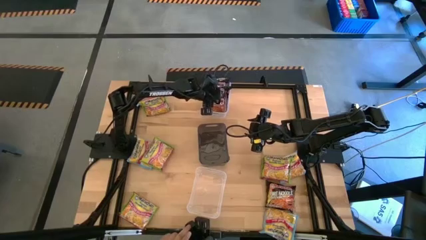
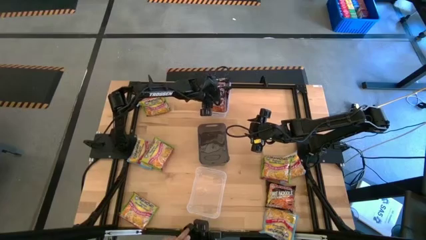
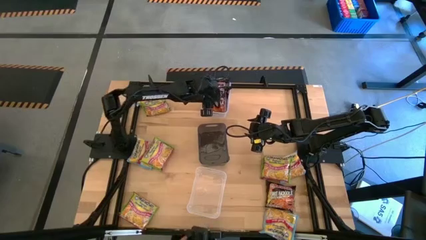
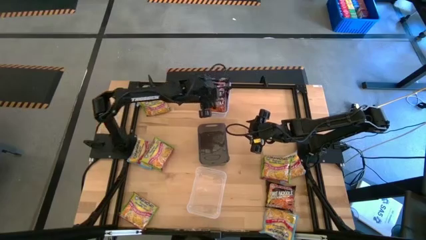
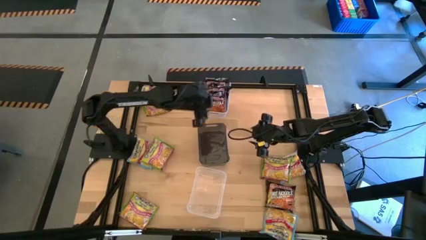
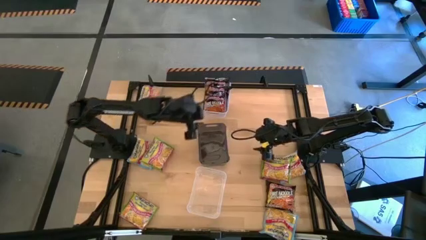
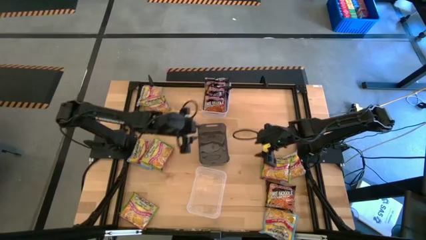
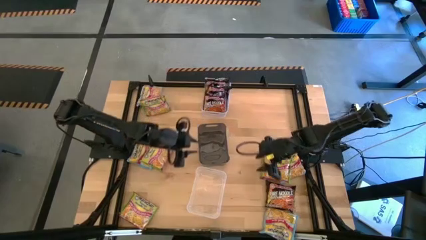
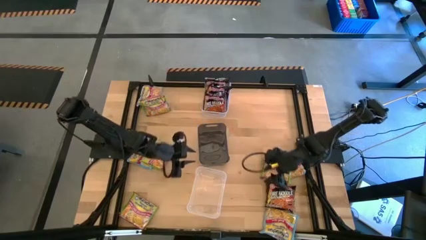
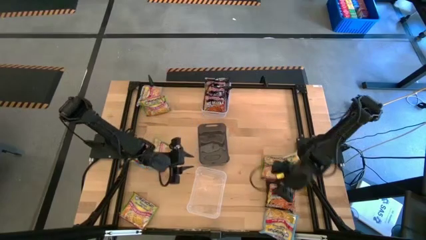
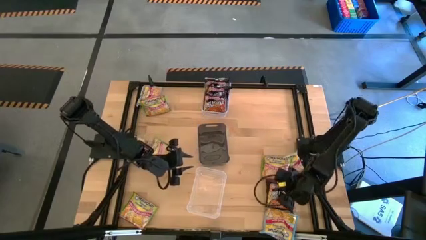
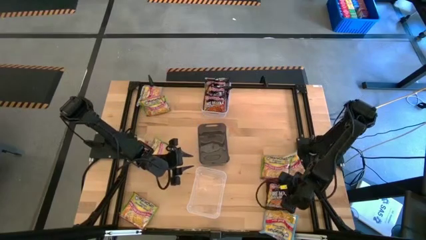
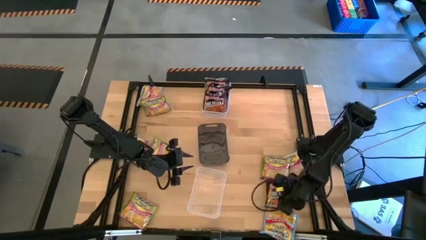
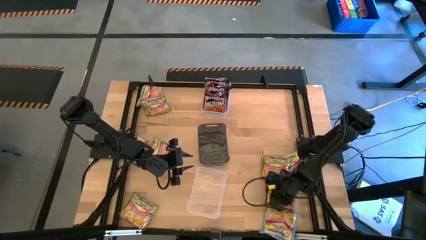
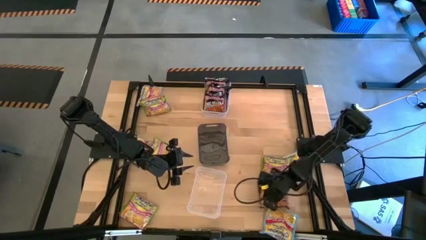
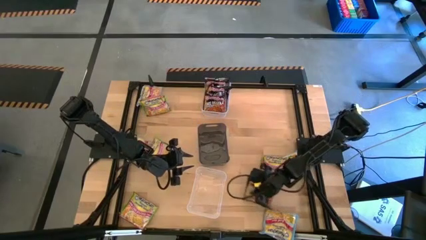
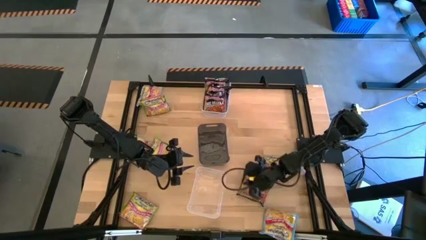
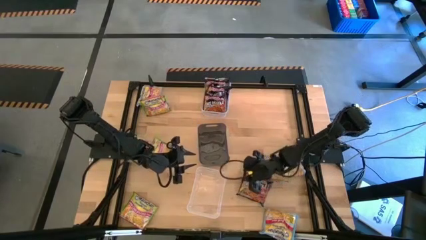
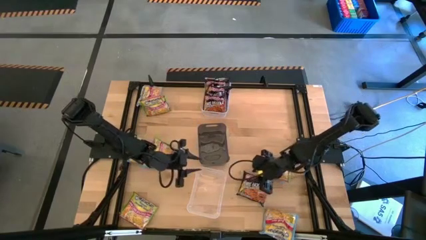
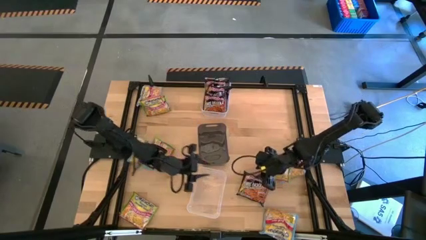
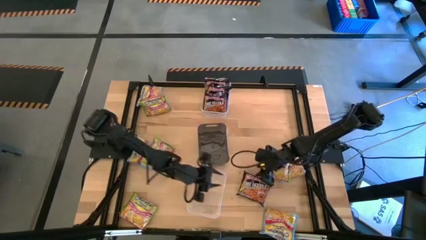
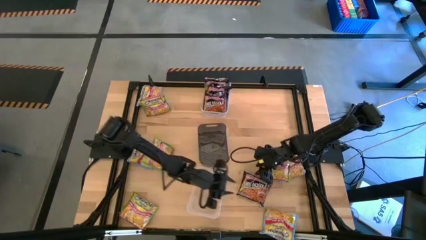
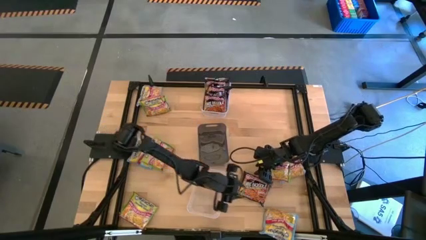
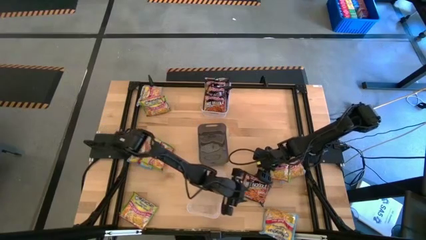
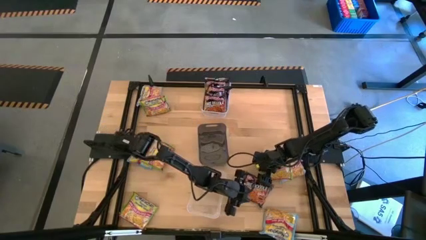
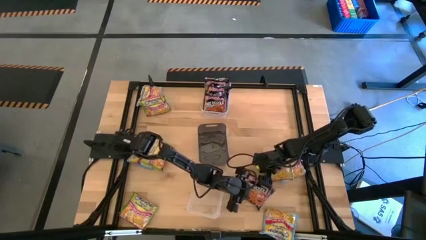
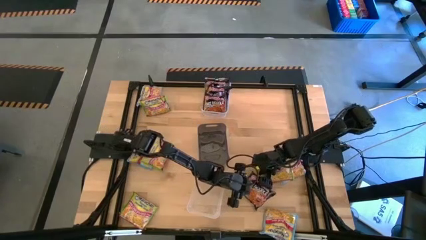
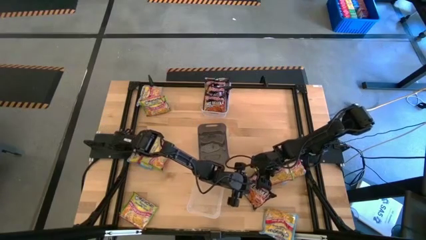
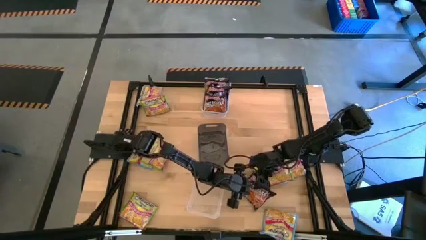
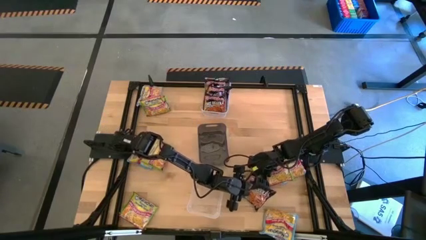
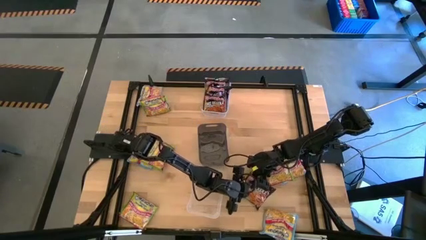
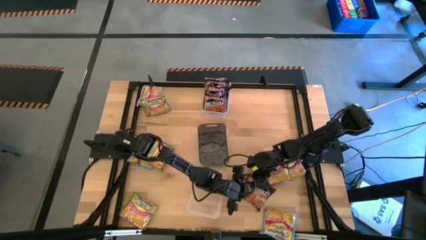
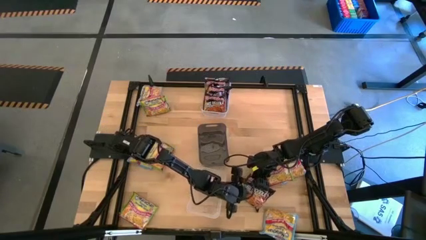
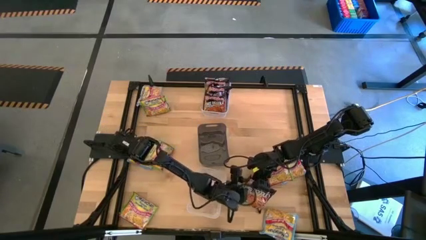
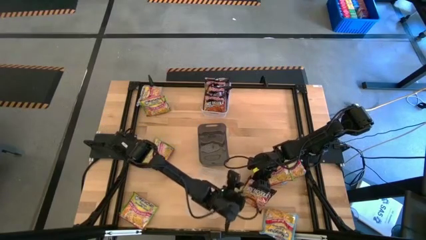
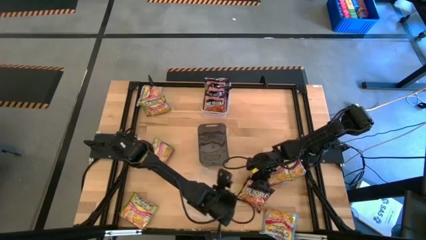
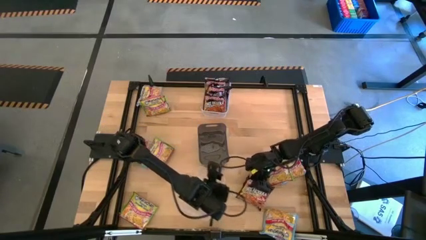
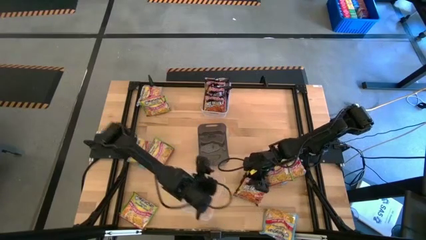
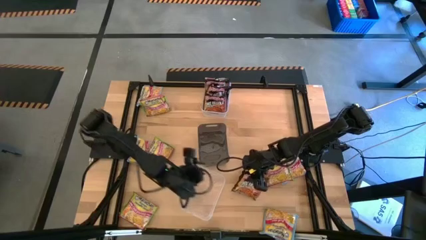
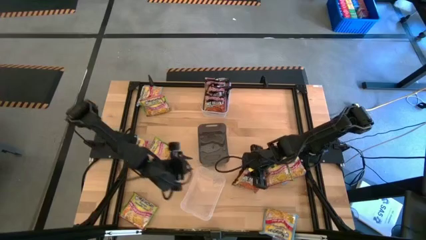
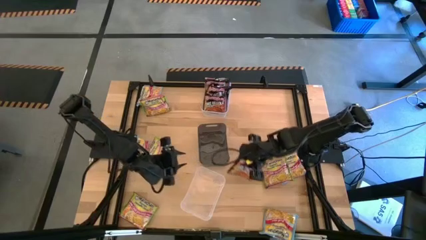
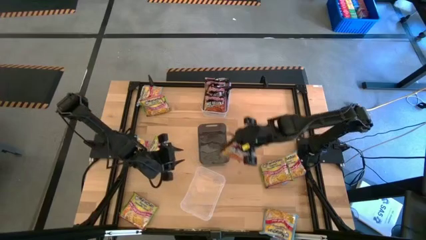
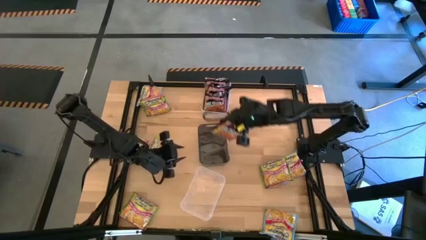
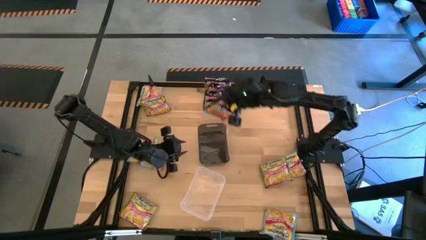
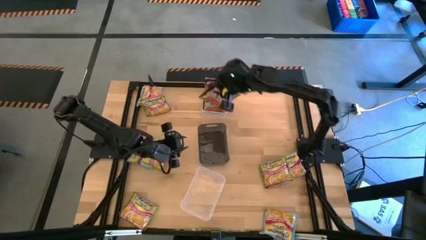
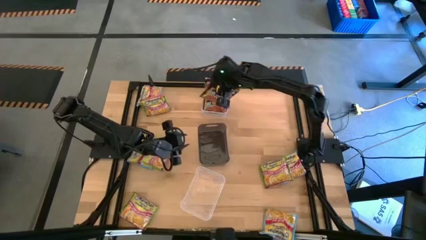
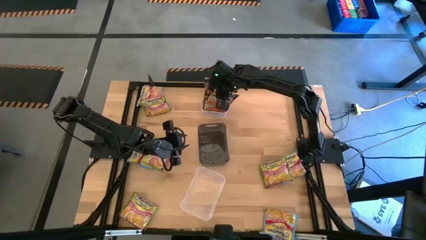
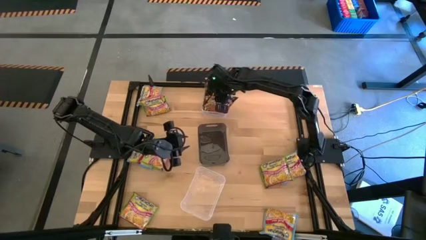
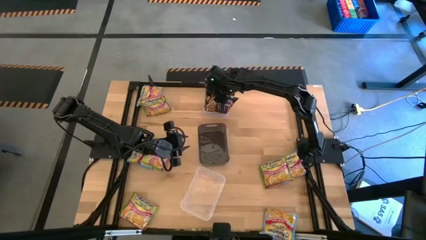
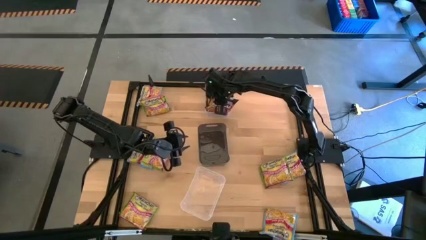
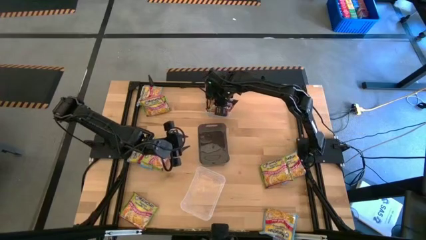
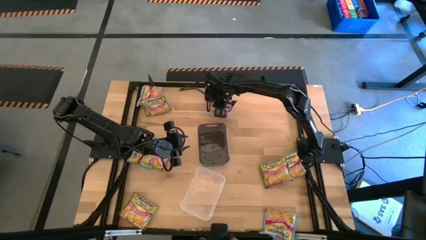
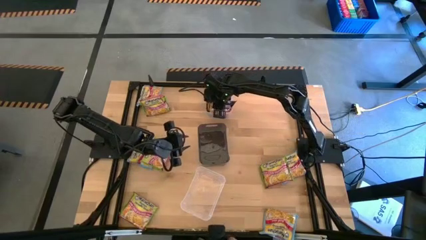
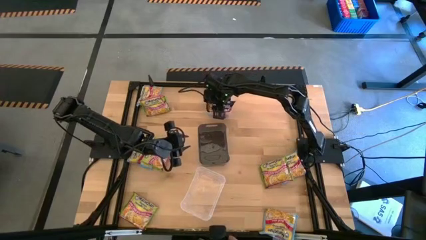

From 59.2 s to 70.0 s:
Task: Sort Maruchan noodles
Put the black noodle pack into the top transparent bin

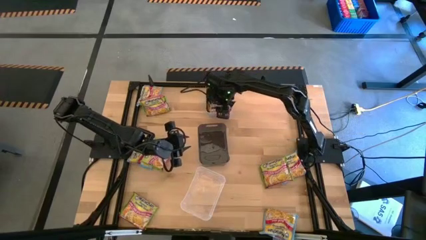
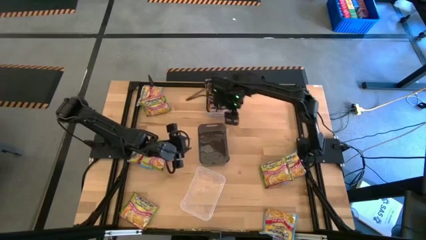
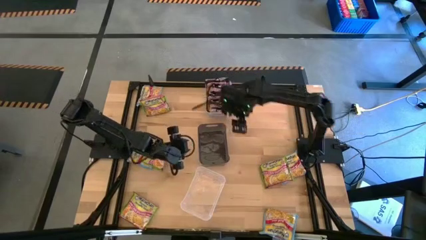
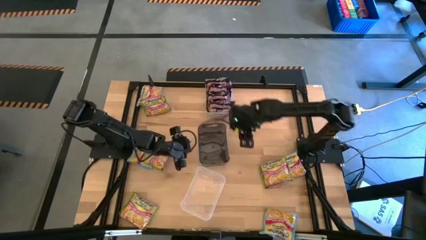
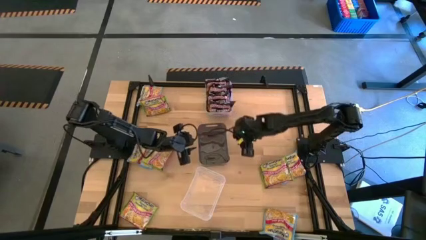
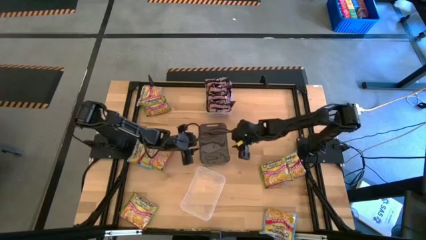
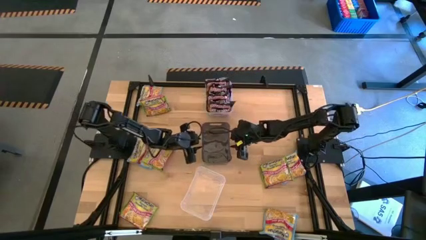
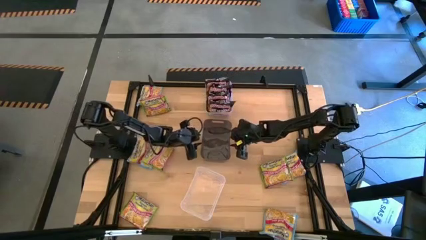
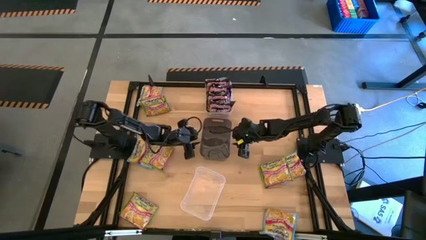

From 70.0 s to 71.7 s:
Adjust the black bin

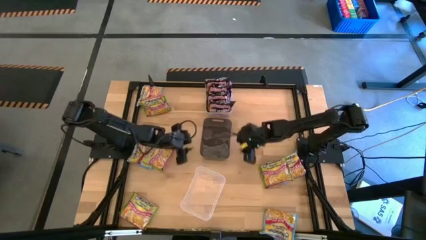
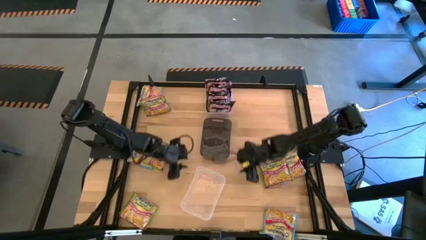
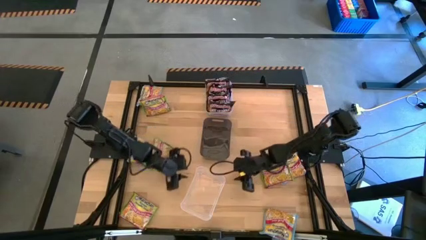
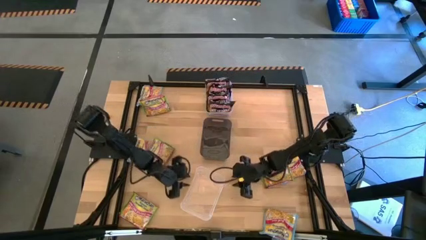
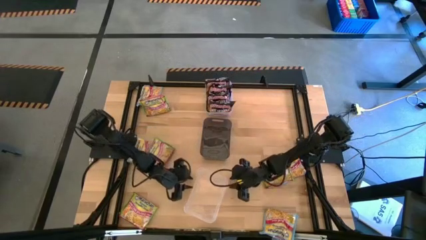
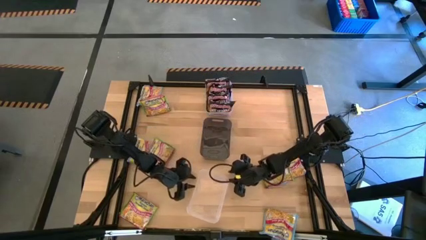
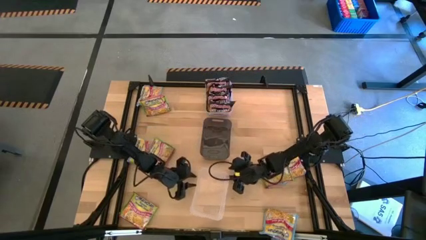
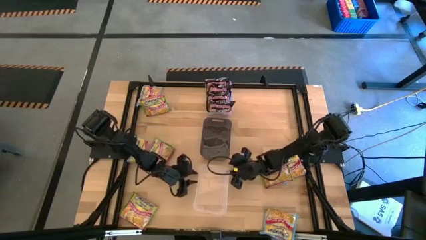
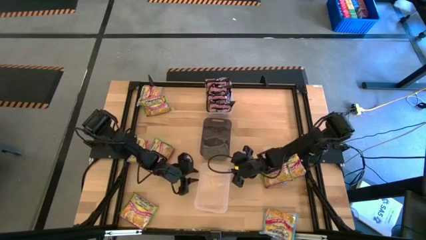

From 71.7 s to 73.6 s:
Adjust the bottom transparent bin

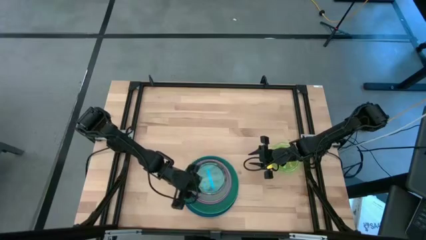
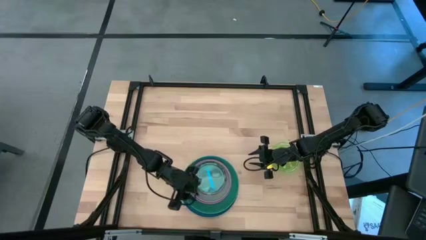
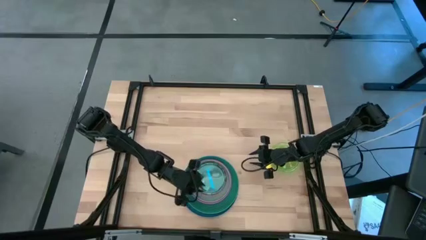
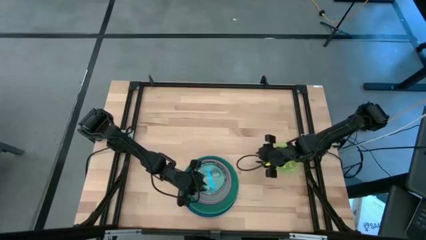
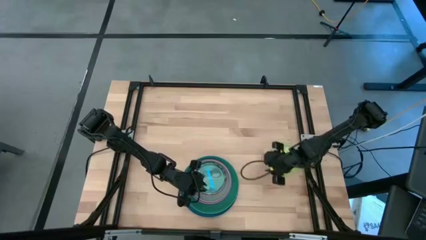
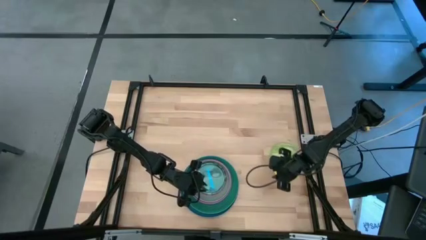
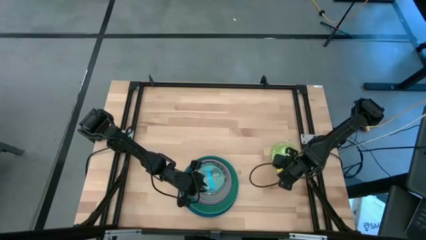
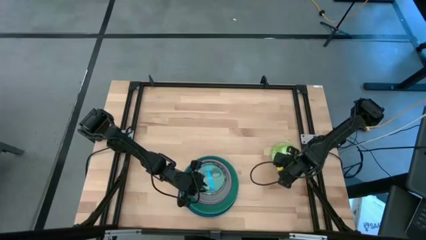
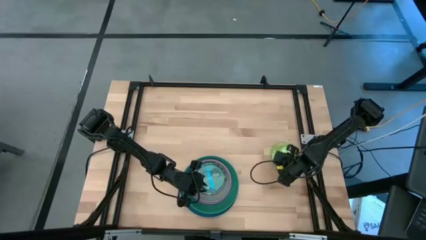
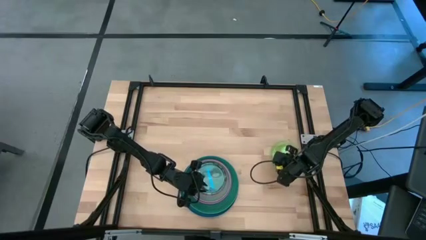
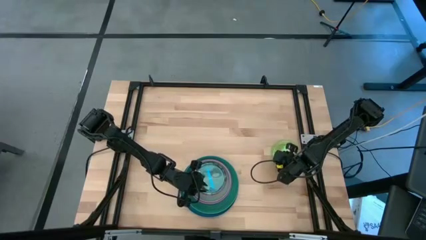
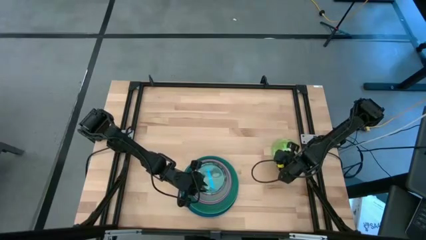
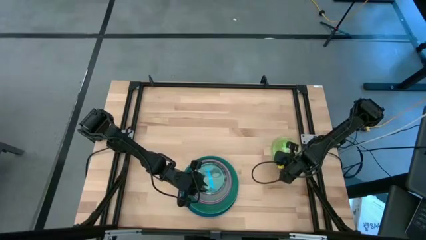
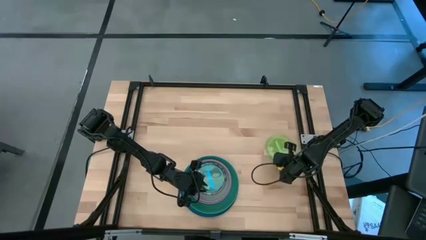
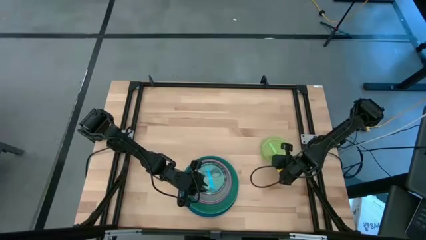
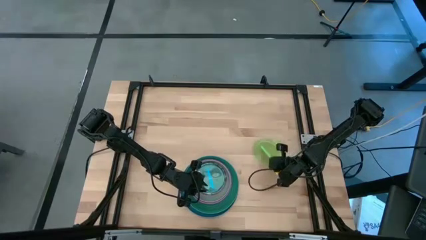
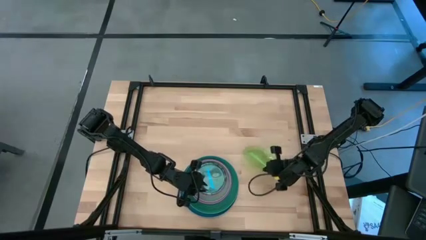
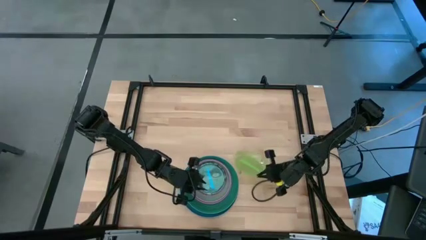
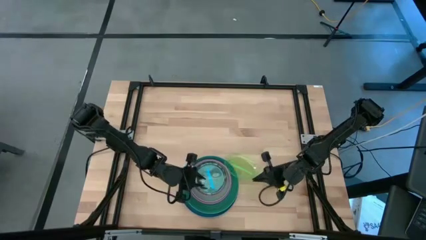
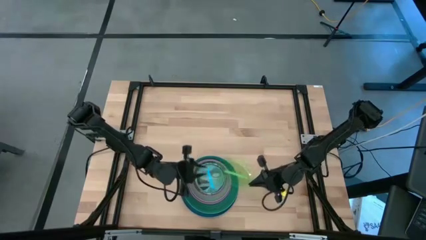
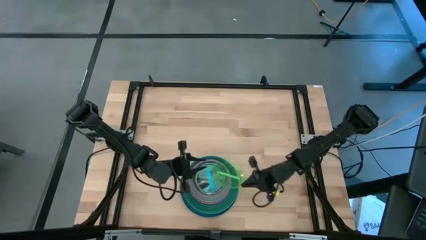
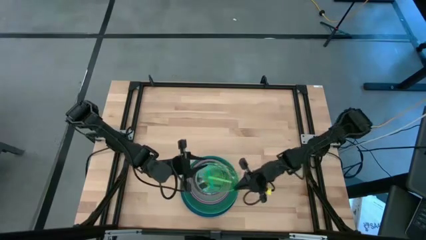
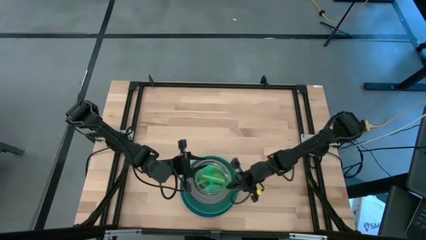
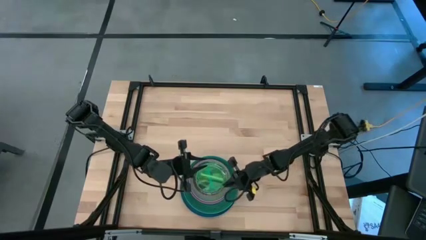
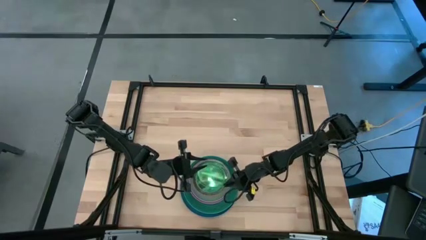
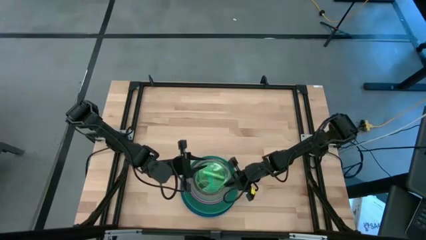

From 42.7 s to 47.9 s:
Task: Stack plastic plates
Stack the green plate on the blue plate
